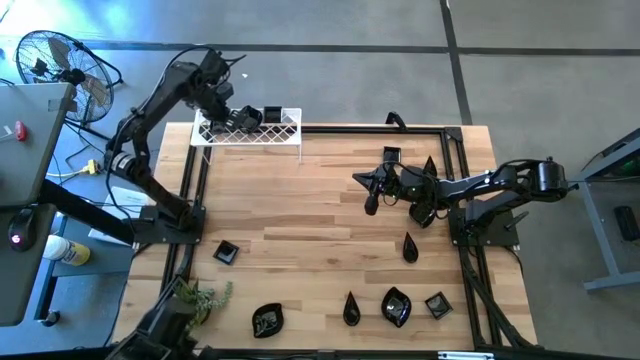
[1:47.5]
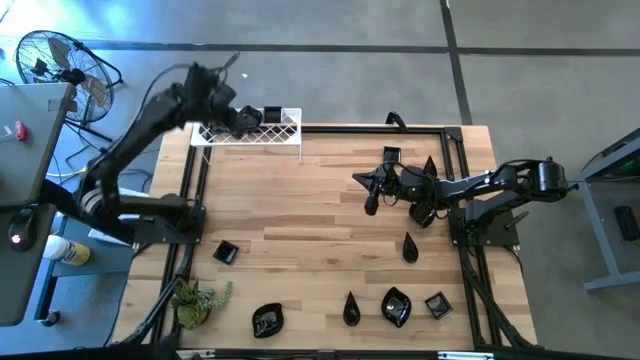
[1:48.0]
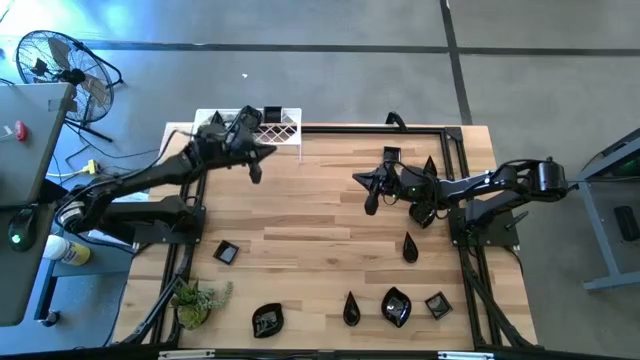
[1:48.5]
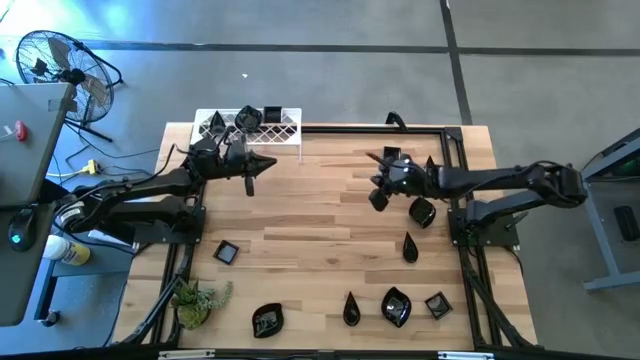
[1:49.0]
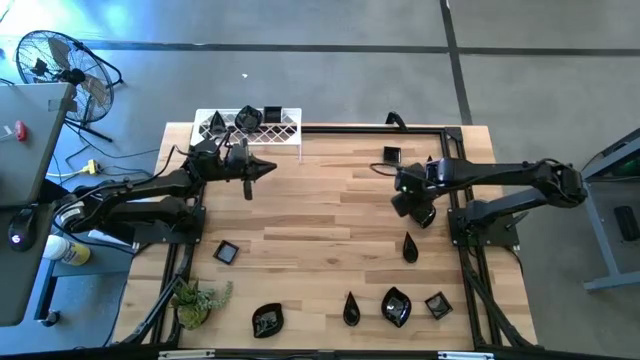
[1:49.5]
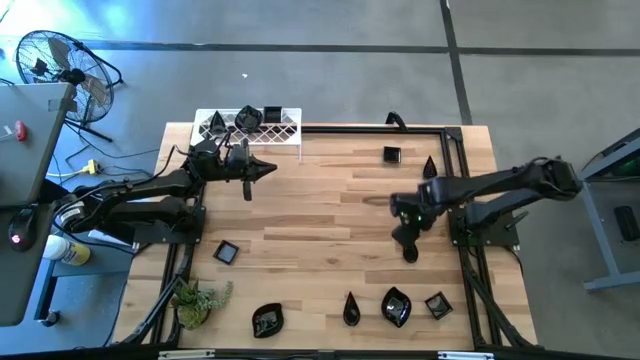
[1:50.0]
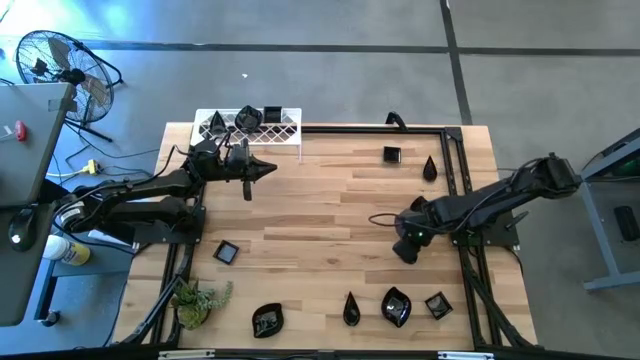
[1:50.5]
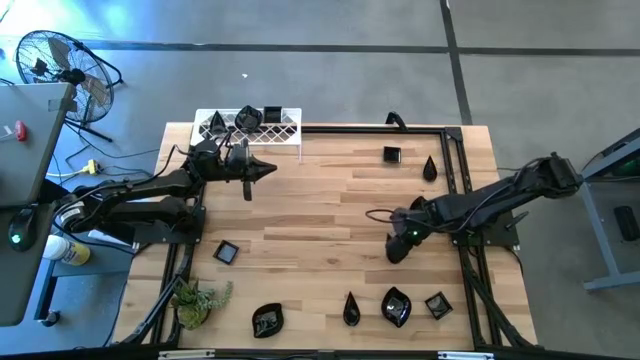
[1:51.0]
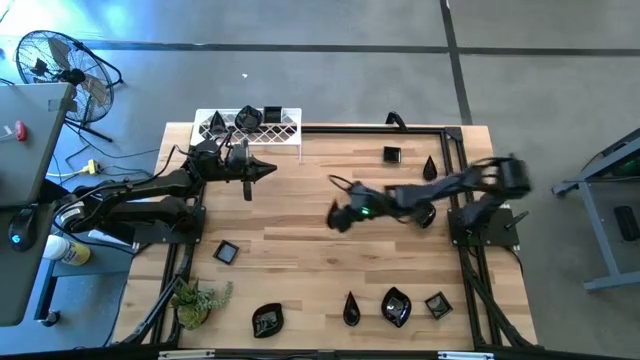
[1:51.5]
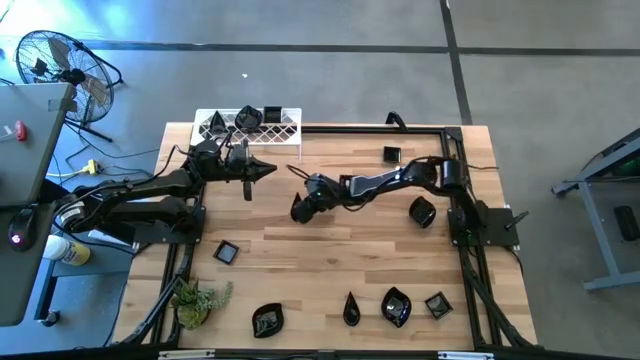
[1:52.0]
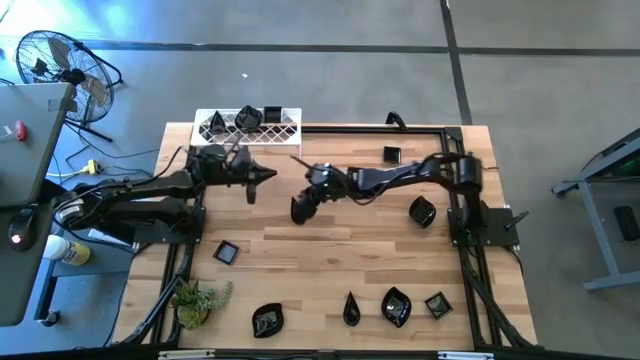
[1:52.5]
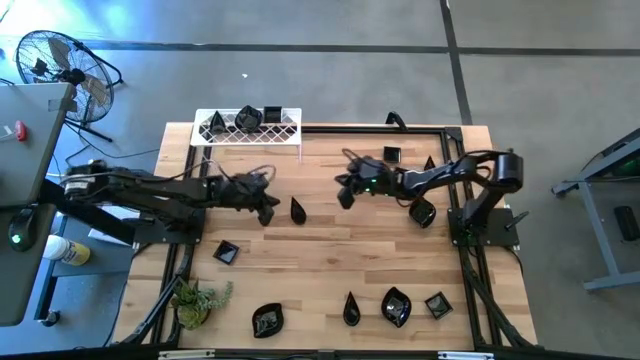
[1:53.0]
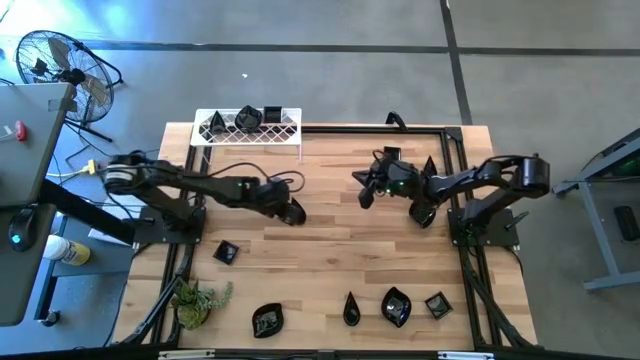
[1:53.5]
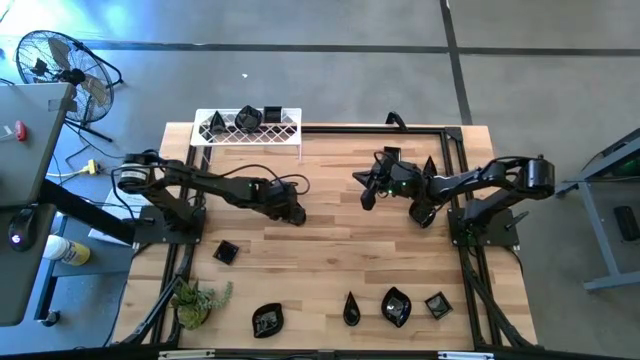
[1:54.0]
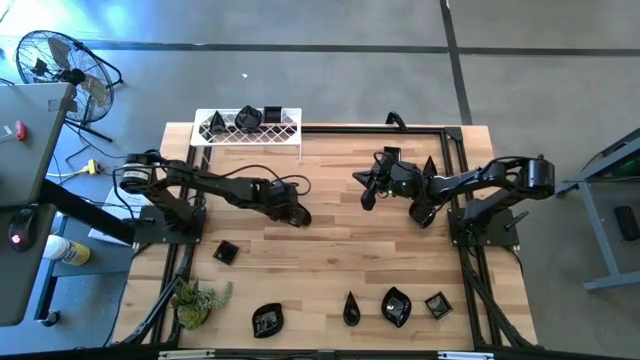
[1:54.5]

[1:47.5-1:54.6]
Task: Pick & Place Mini shaped plates
Stack the middle drop-shaped plate on top of the drop-shaped plates on the shelf

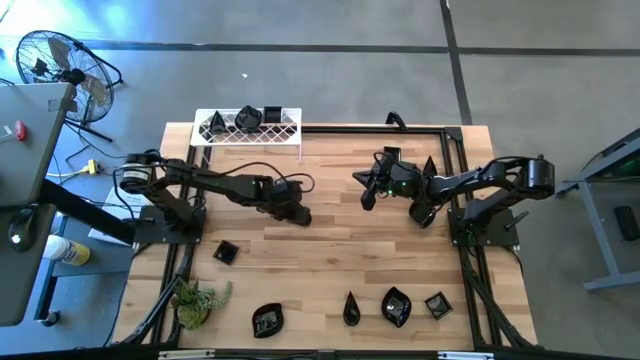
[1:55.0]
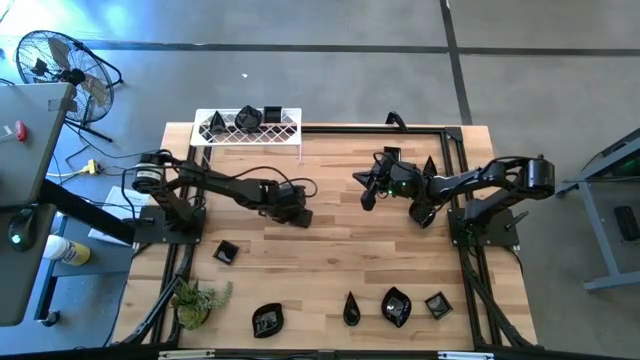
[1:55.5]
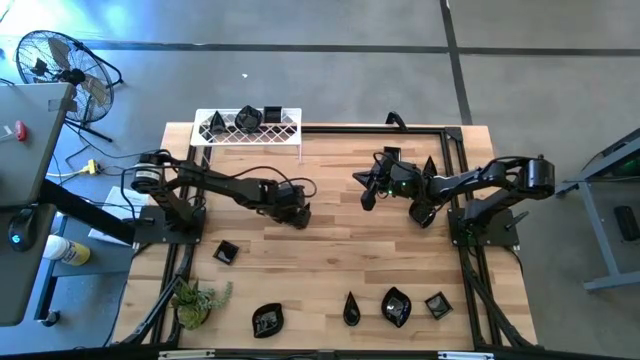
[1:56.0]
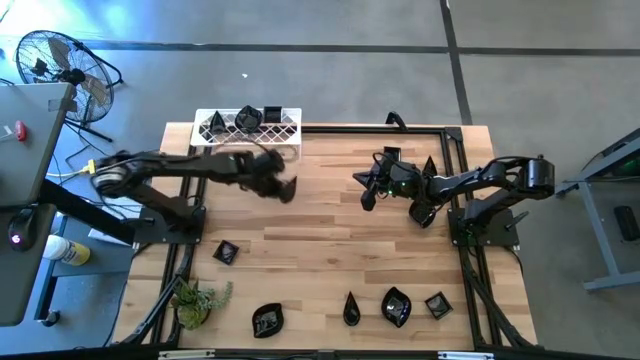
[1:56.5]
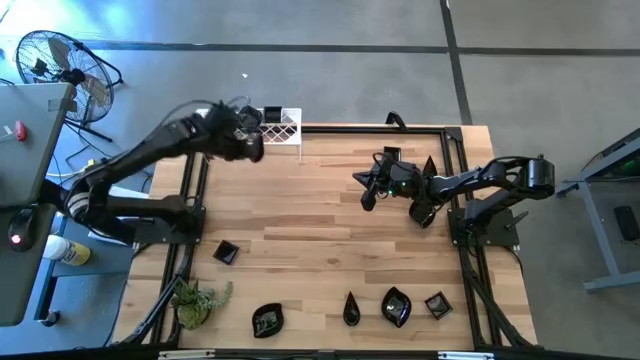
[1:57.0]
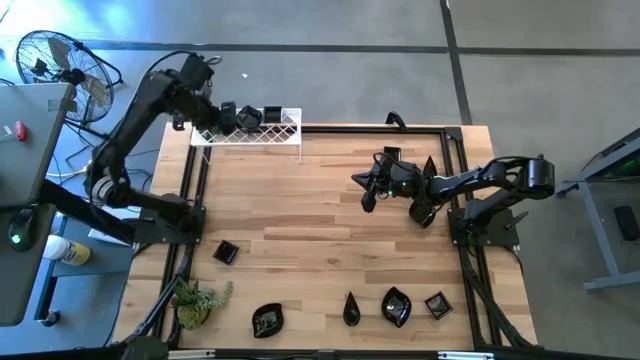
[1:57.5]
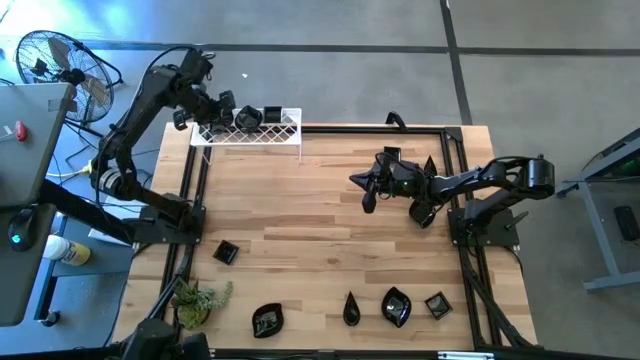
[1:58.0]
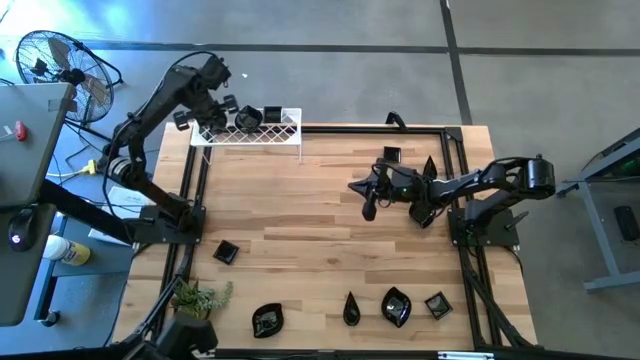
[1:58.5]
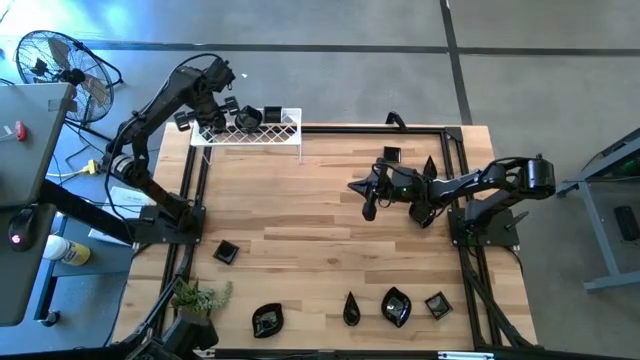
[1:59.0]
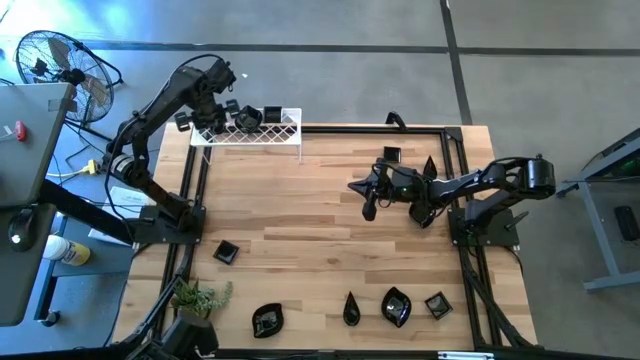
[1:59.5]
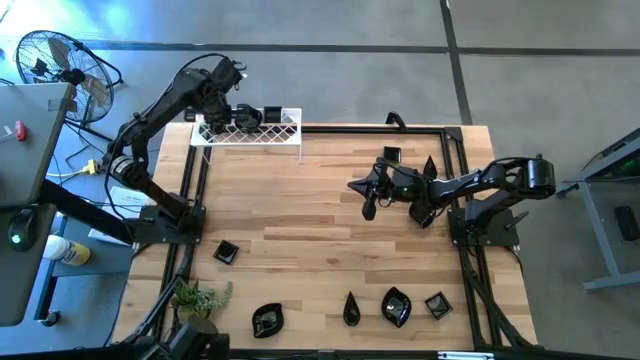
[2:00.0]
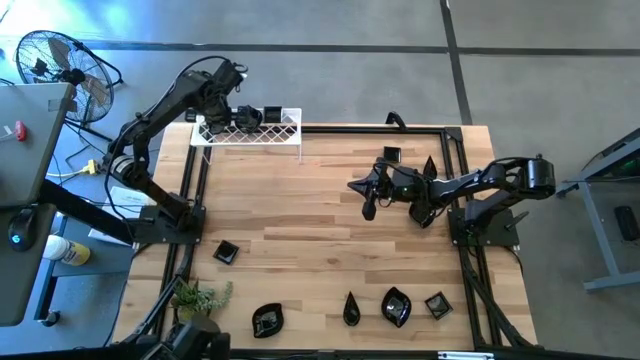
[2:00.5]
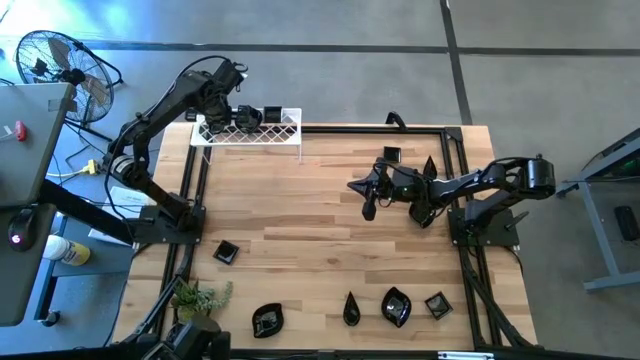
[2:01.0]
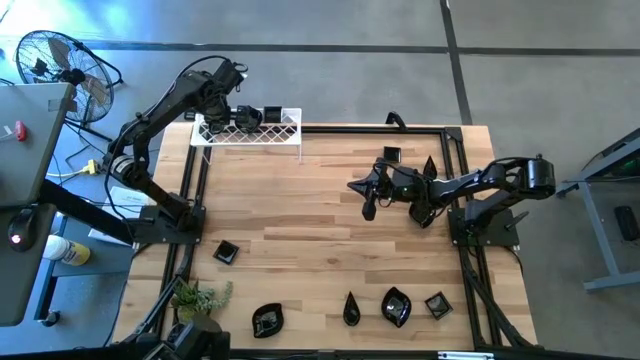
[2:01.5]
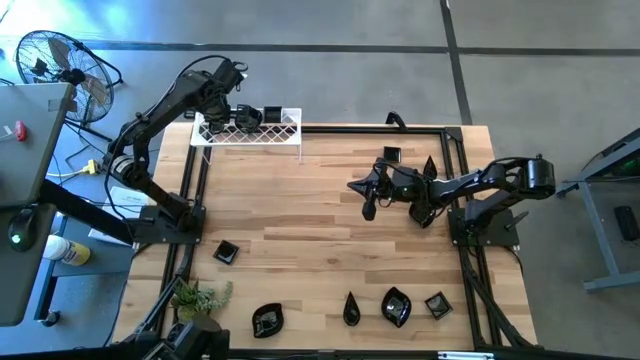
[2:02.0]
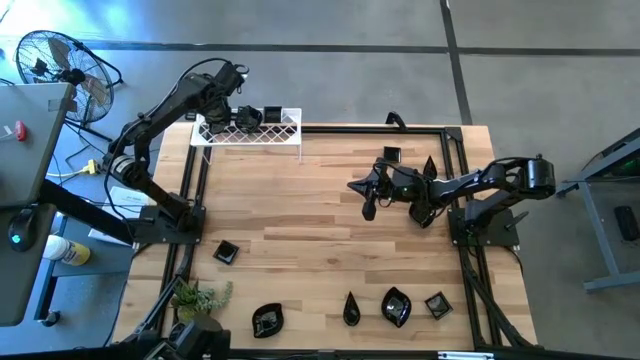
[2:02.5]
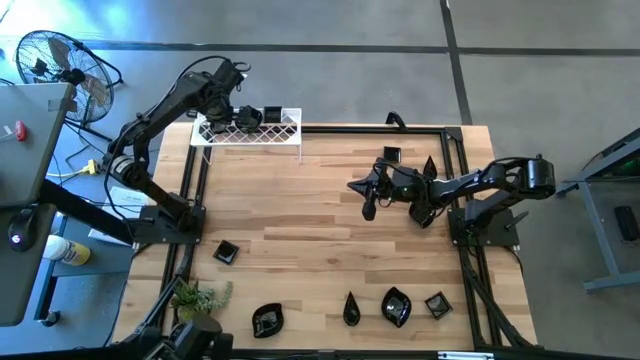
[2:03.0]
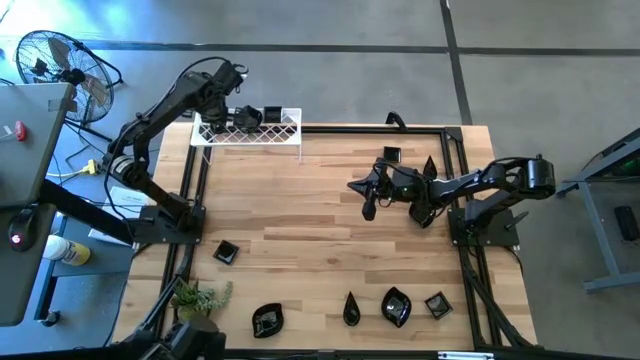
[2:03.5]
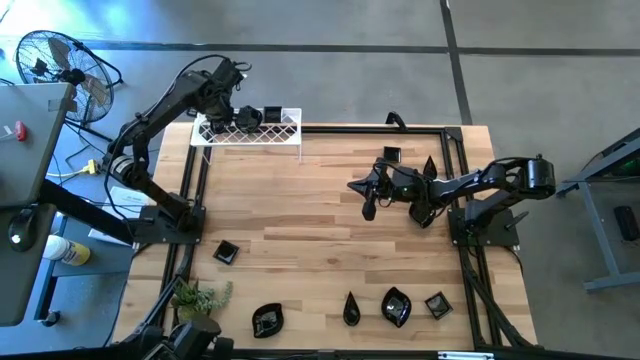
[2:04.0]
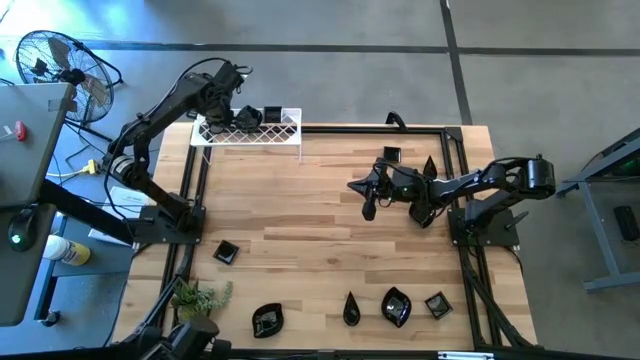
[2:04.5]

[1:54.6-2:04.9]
Stack the middle drop-shaped plate on top of the drop-shaped plates on the shelf

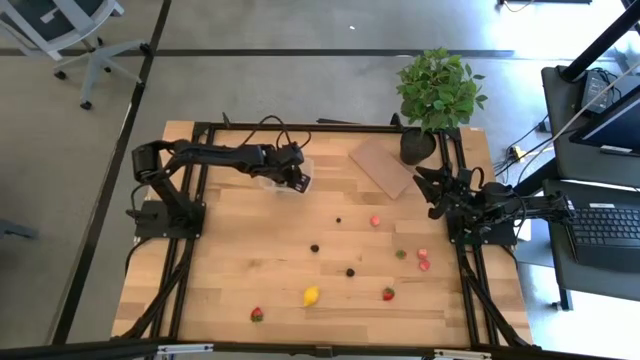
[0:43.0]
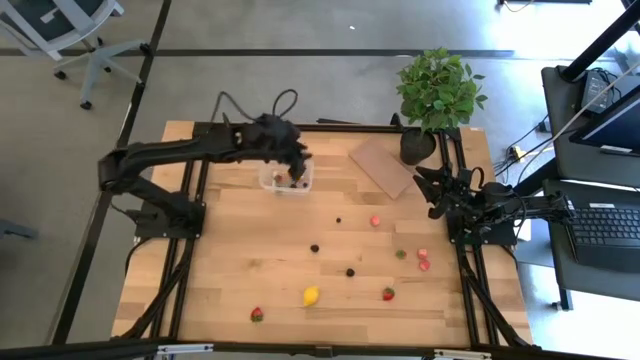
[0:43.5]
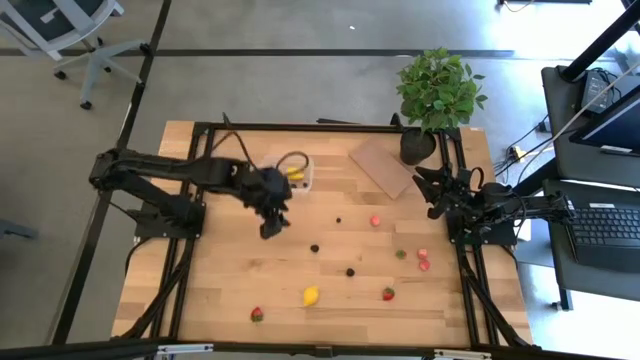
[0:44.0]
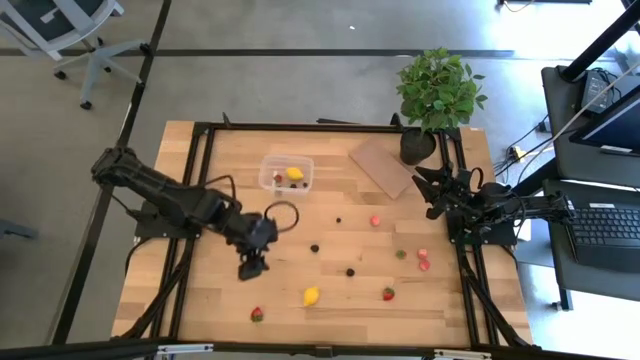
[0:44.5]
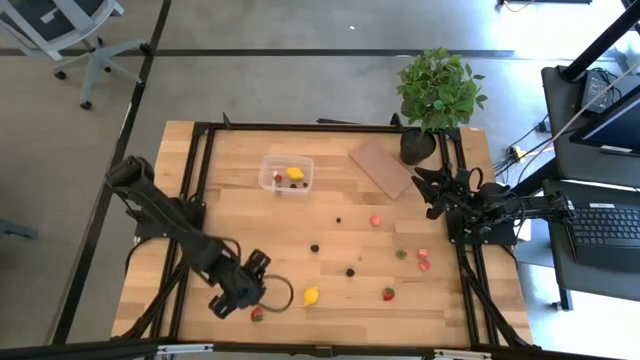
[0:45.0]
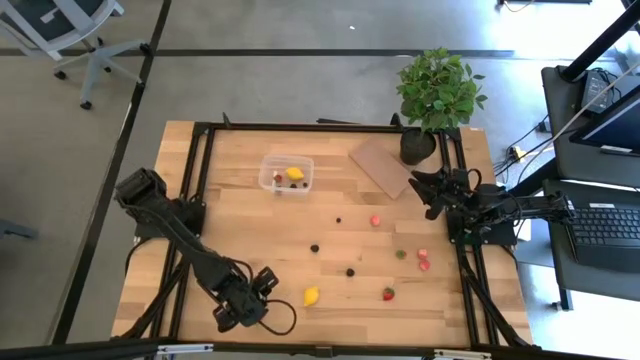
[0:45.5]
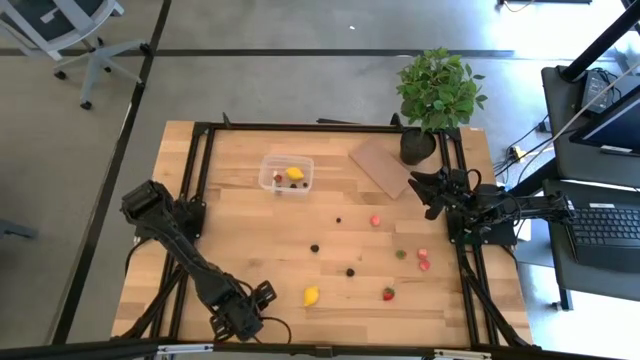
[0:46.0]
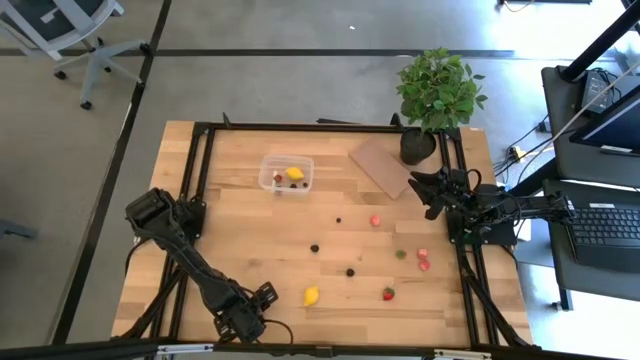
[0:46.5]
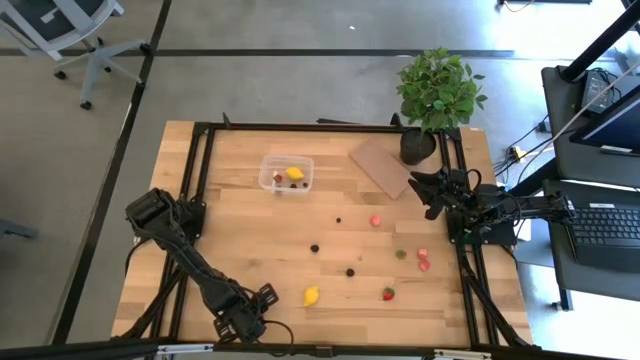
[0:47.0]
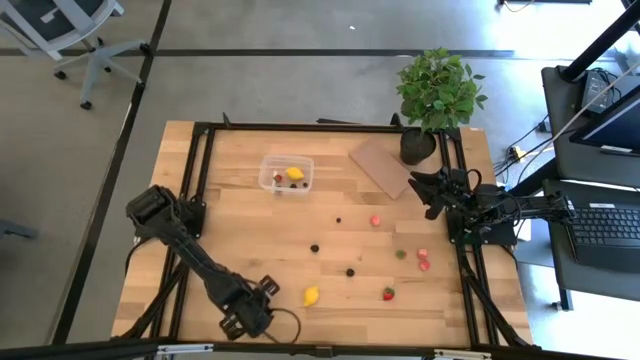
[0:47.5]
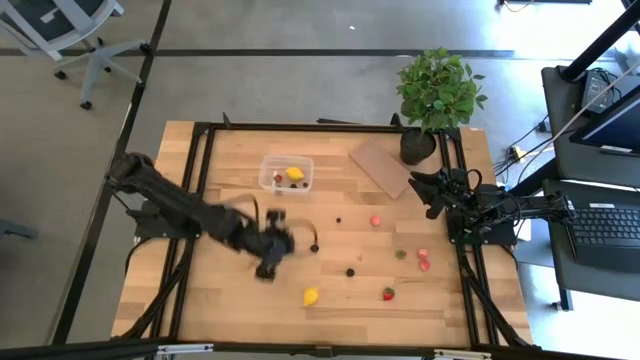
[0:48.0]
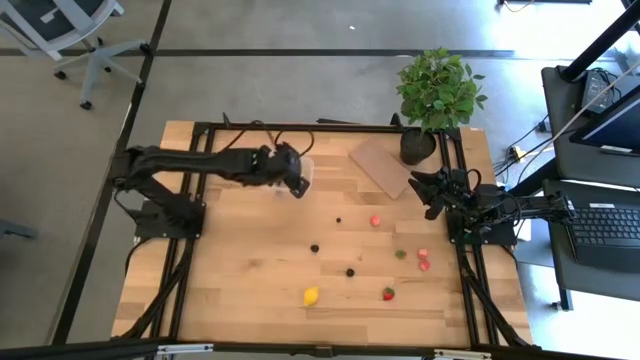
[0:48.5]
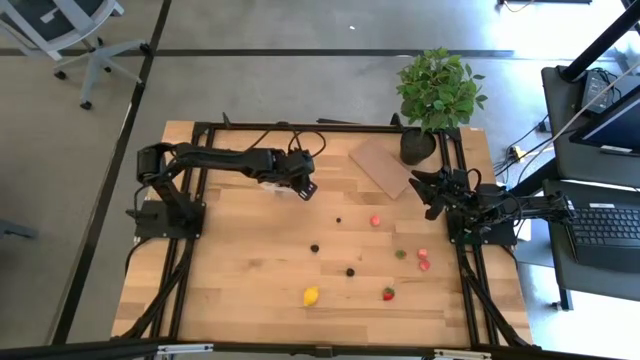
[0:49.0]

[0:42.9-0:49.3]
Task: Pick and placing Produce into tupperware
Put the red strawberry into the transparent bin
